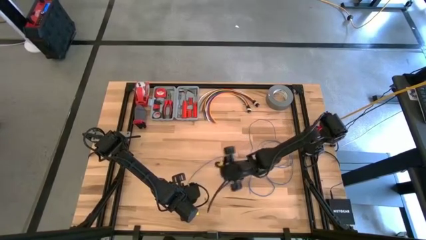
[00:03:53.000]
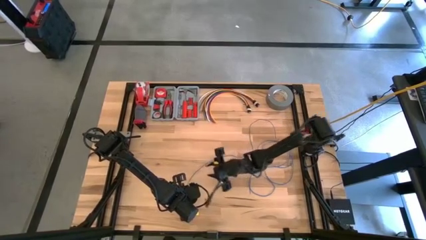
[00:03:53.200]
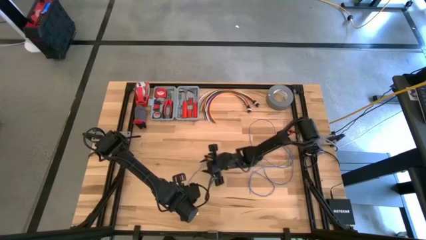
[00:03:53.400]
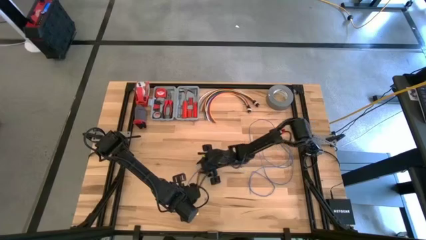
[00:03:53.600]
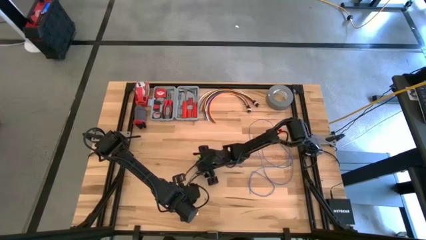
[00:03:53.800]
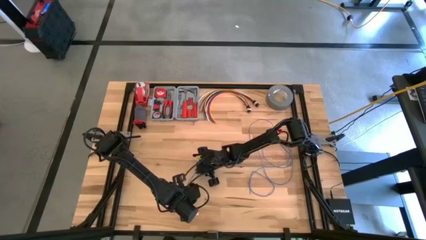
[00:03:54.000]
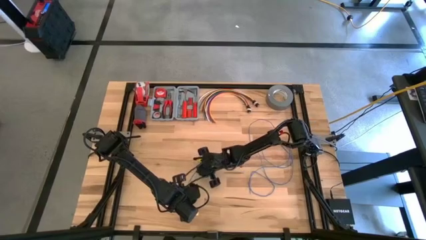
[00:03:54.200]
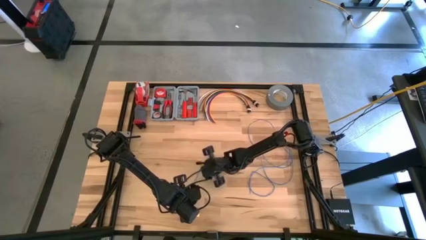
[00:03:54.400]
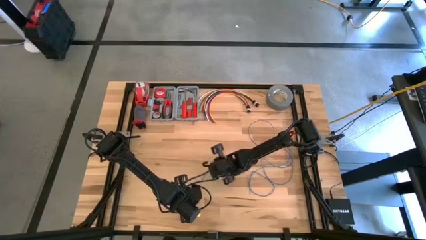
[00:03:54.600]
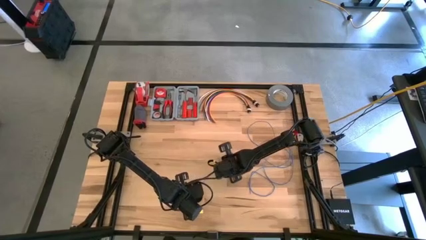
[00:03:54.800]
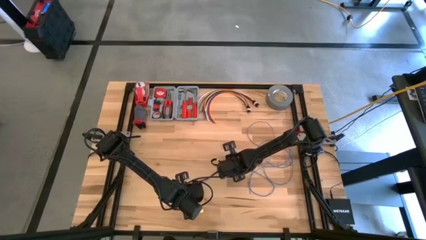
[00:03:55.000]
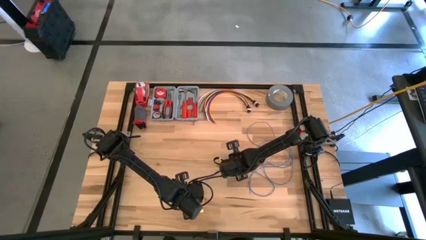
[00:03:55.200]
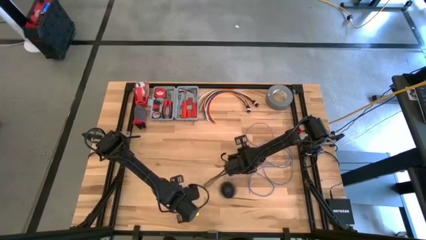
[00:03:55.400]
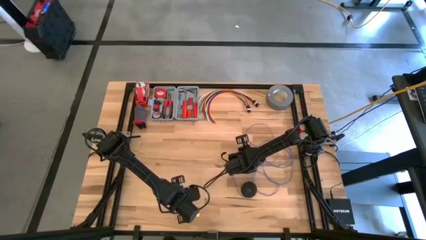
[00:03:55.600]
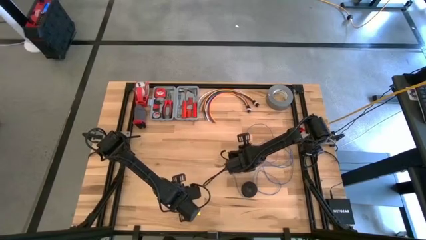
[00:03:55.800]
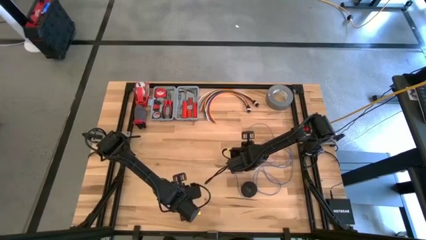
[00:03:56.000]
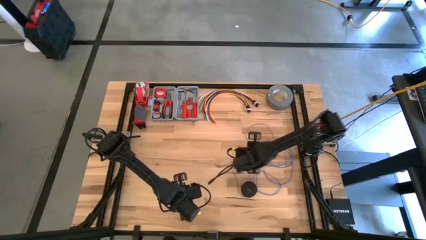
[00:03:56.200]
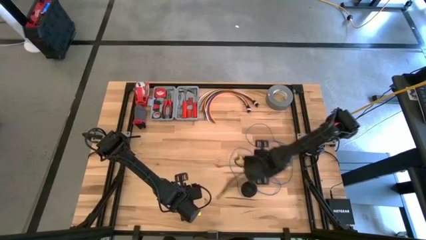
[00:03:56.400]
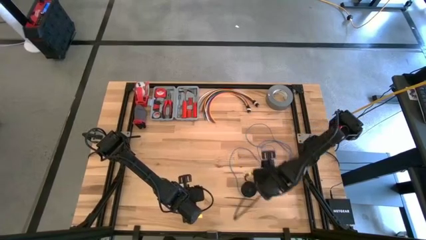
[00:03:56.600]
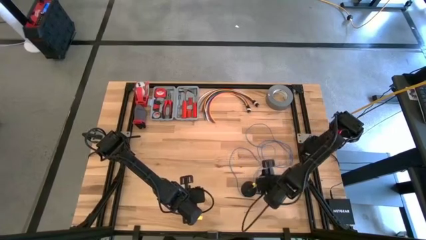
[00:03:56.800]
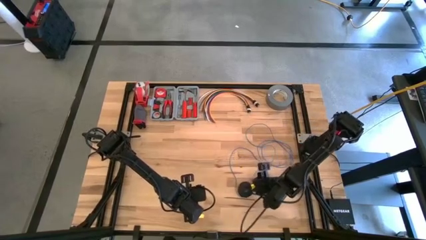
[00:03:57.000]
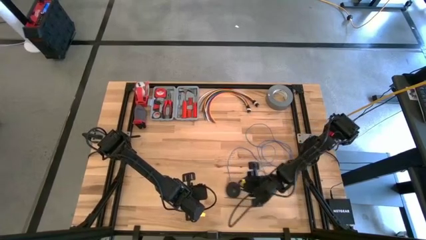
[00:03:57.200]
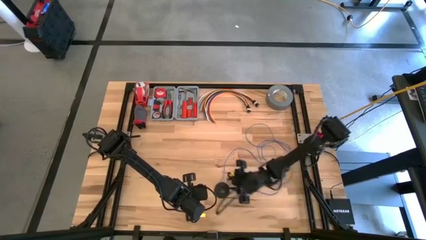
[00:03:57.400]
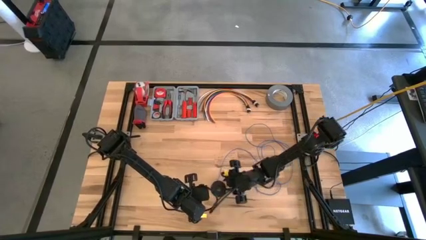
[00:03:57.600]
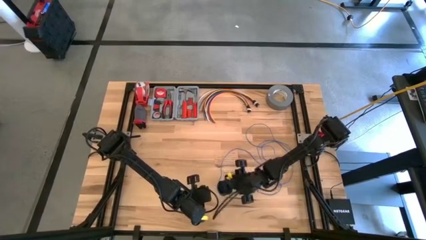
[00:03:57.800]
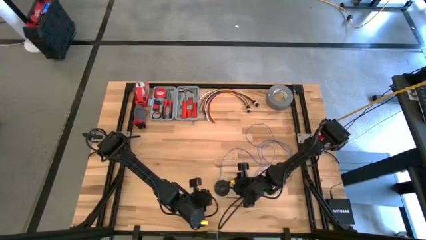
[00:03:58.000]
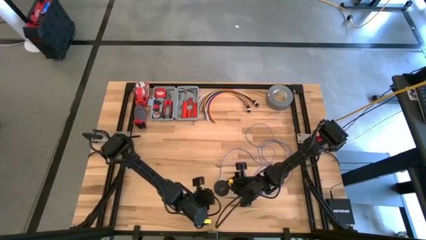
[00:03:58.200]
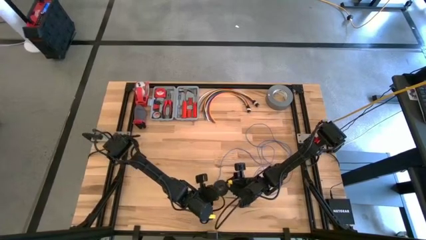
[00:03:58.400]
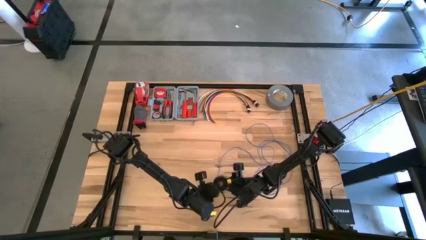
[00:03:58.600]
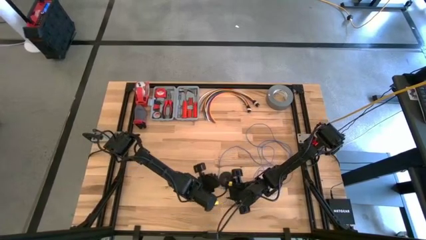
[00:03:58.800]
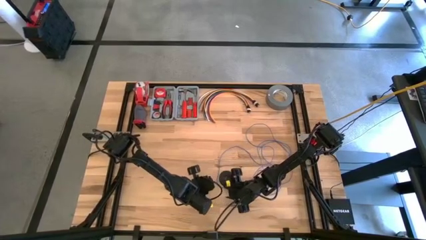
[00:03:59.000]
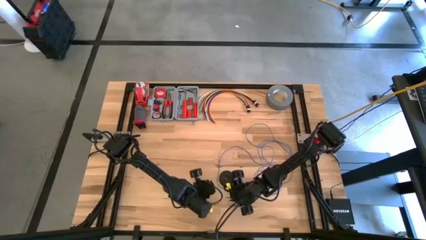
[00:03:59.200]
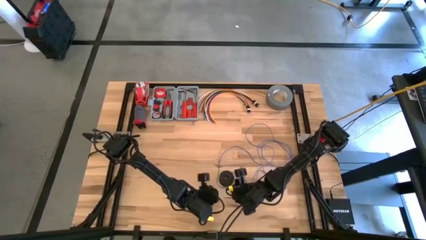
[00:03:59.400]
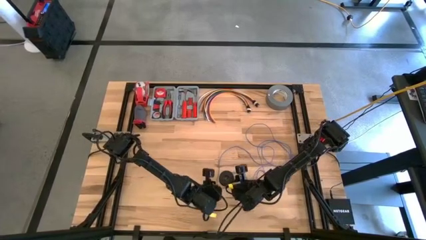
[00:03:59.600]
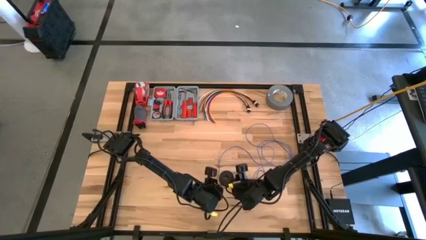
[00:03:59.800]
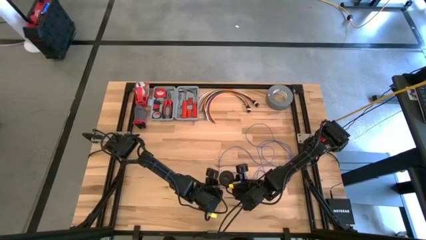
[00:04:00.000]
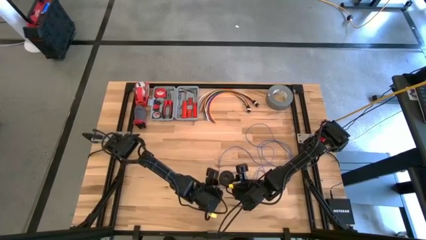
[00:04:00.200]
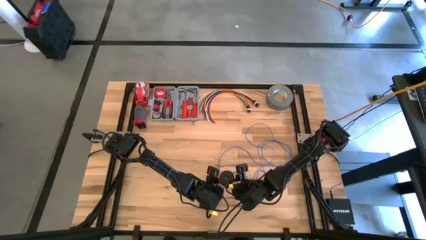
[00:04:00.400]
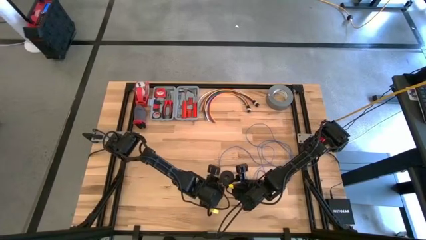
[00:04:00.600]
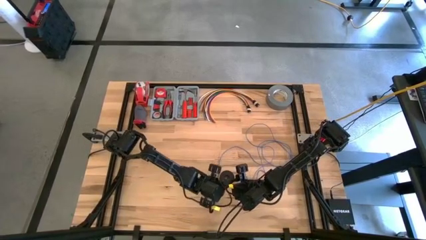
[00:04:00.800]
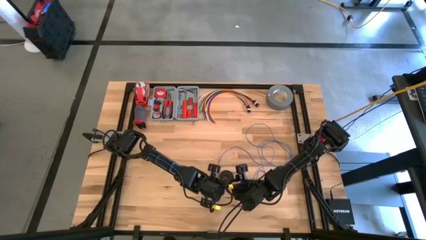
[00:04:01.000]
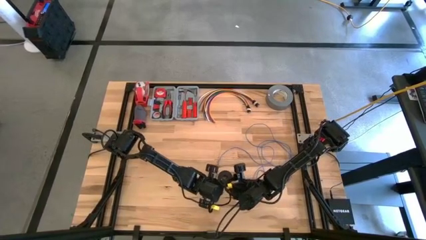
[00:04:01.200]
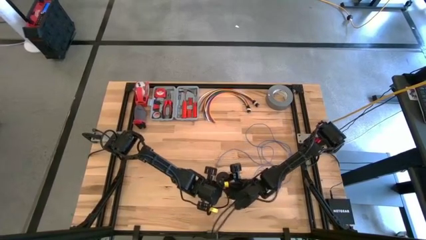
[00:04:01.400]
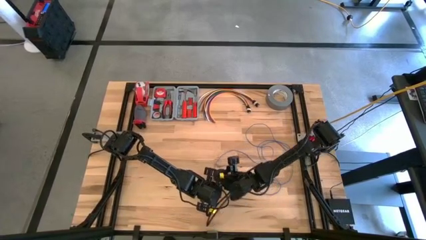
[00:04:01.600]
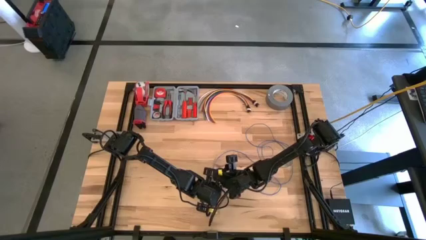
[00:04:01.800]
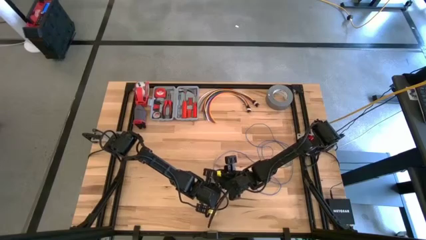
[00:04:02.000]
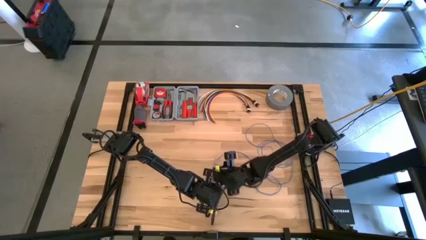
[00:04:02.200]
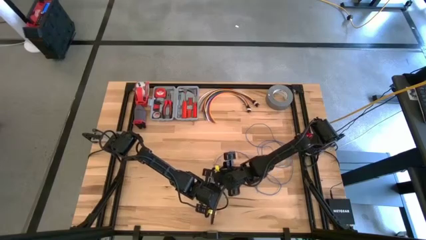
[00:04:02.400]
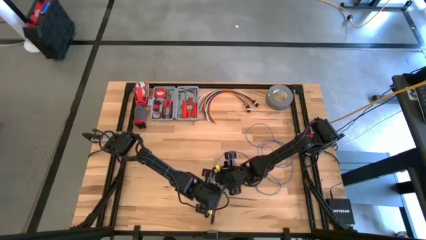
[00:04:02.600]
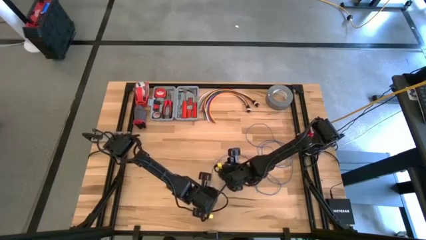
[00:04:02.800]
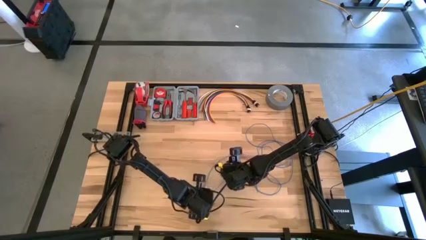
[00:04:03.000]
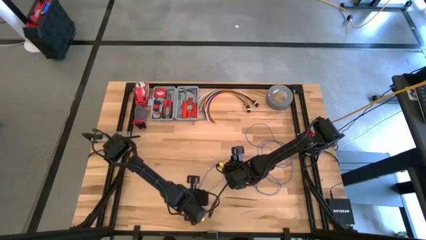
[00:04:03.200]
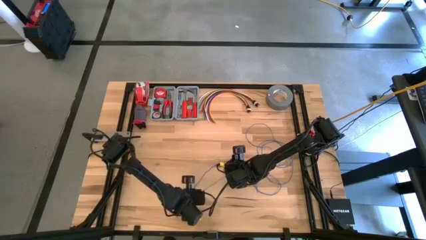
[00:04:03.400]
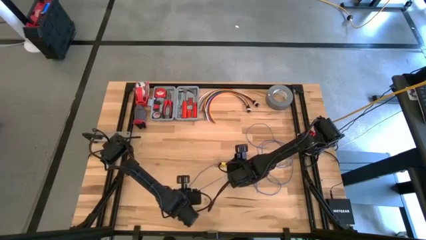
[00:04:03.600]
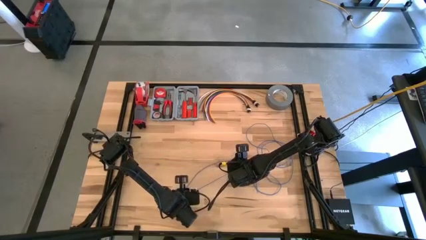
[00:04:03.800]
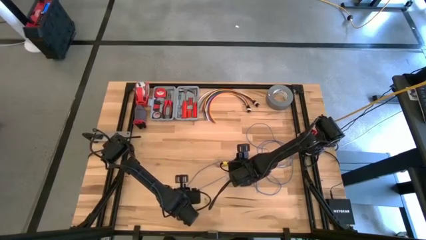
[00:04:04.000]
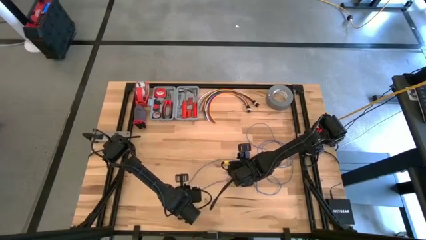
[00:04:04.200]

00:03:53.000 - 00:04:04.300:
Task: Coil cords
Uncoil the blue wire into the black spool

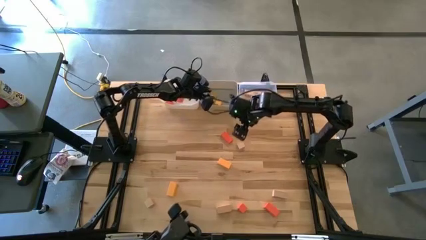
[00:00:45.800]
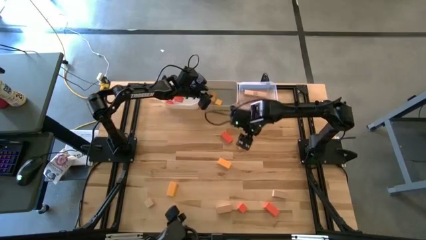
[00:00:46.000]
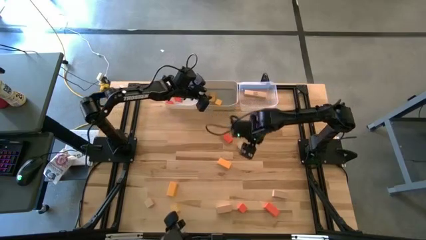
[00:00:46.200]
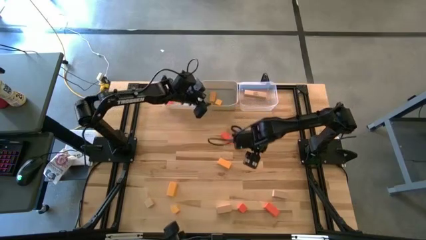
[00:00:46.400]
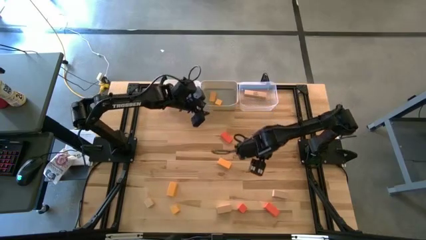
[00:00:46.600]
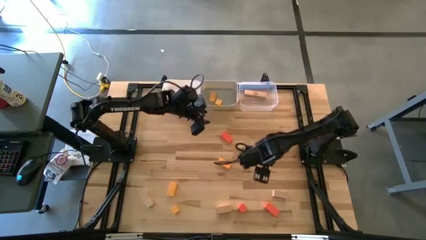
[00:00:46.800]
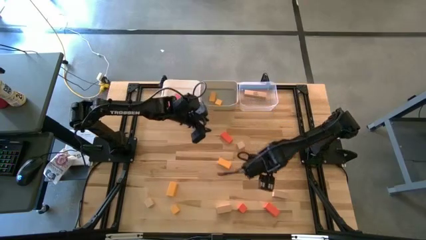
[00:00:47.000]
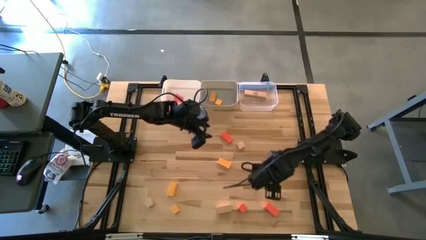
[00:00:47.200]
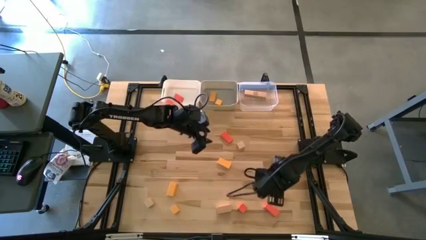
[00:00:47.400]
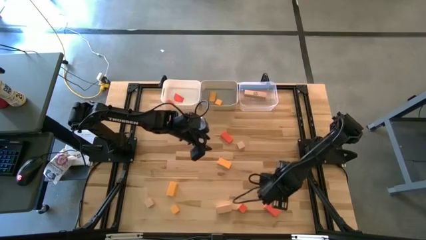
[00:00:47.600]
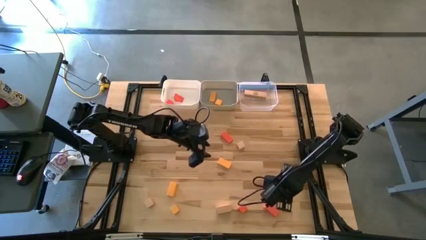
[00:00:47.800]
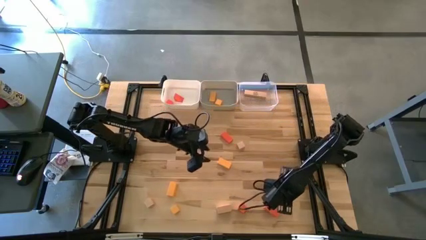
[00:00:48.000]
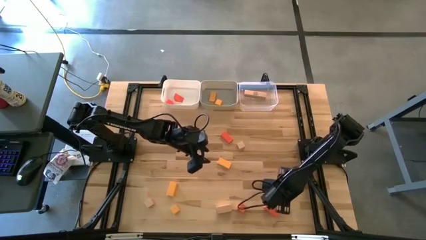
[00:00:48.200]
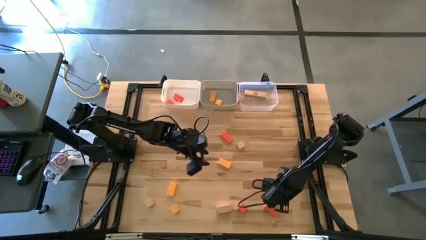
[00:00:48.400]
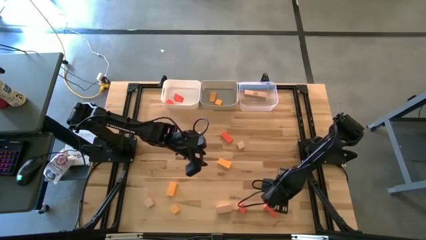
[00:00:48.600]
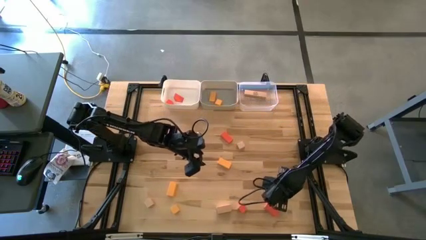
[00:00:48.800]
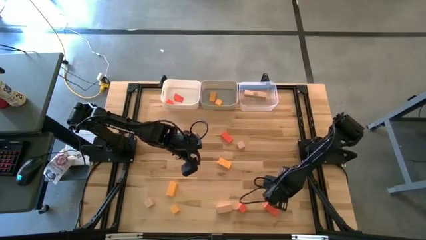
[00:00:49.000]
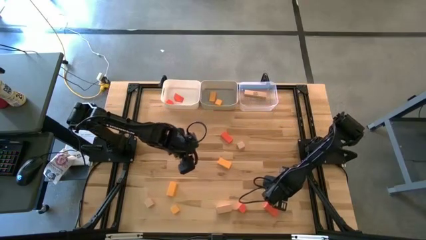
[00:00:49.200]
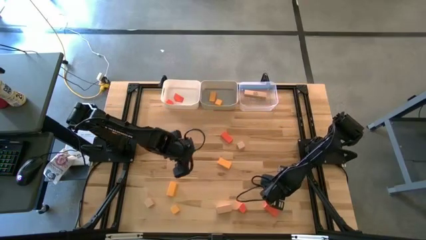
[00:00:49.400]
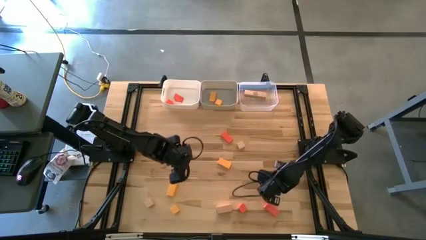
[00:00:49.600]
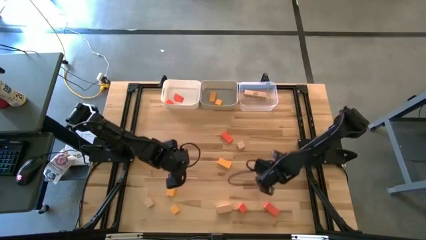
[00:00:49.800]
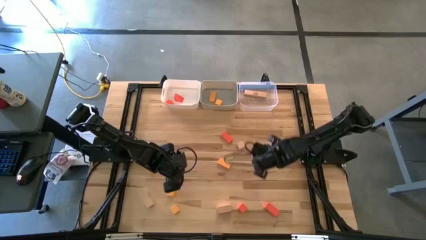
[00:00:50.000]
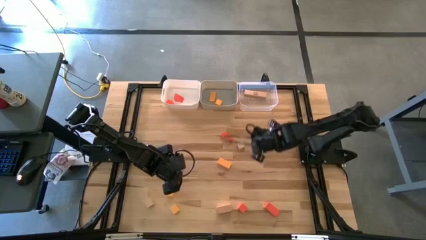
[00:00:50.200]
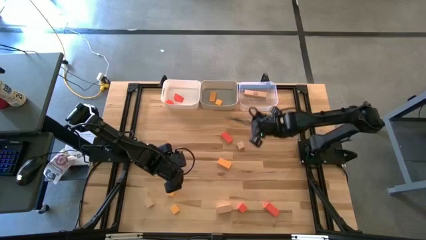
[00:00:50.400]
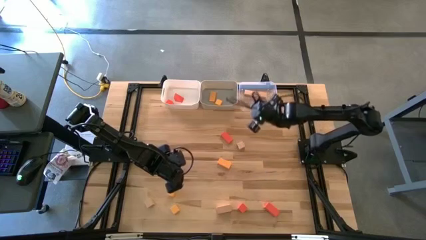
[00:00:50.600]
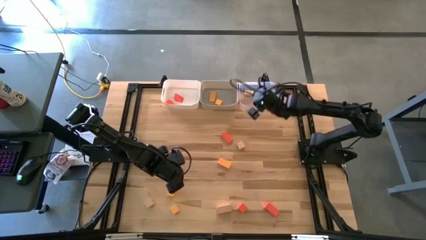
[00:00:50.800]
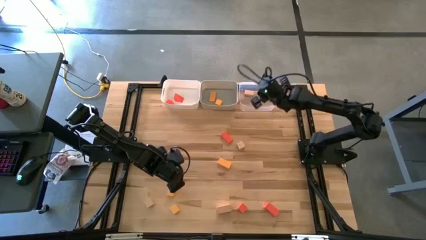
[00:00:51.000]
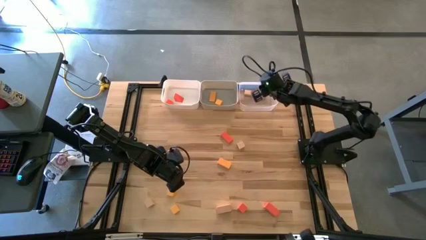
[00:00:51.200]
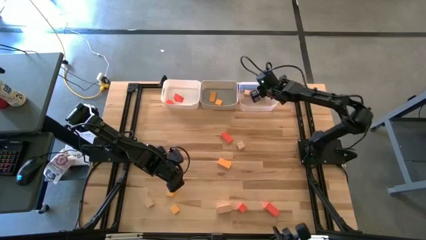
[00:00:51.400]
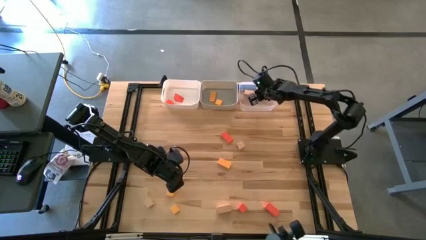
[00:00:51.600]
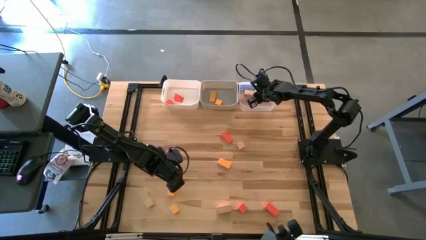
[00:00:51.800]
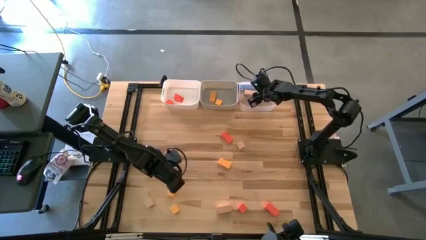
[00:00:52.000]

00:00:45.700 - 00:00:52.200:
Task: Sort & place blocks by color
Put the brown block into the transparent bin
